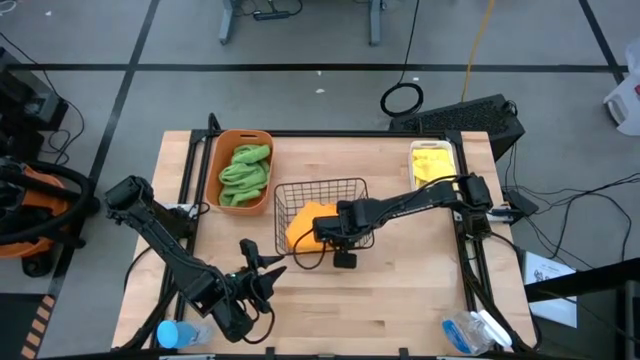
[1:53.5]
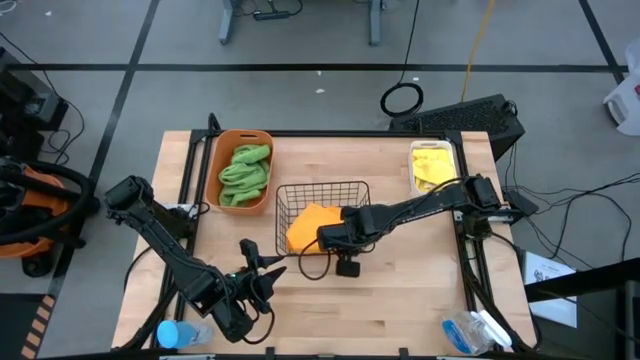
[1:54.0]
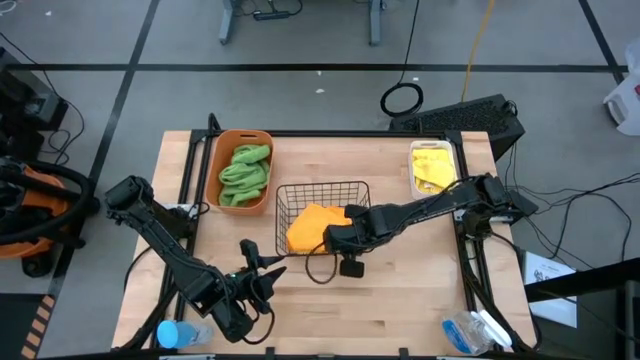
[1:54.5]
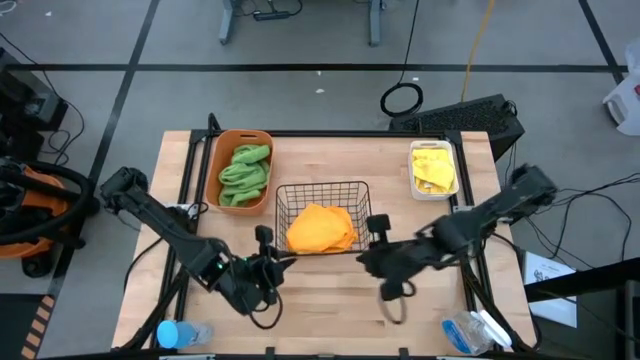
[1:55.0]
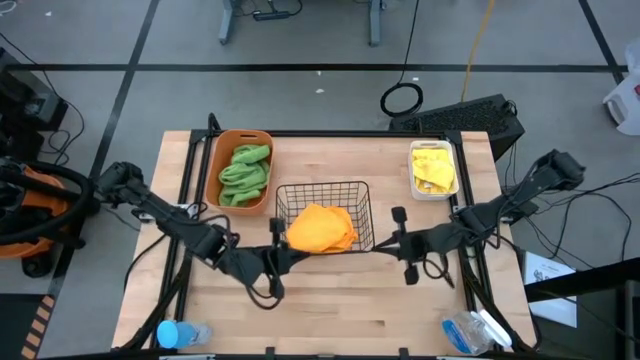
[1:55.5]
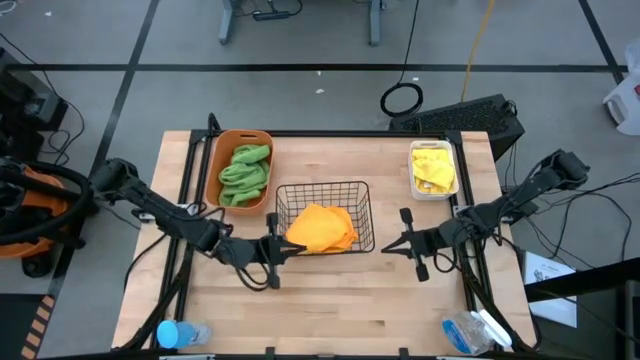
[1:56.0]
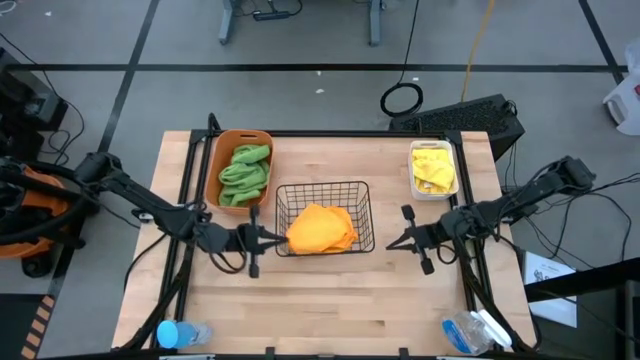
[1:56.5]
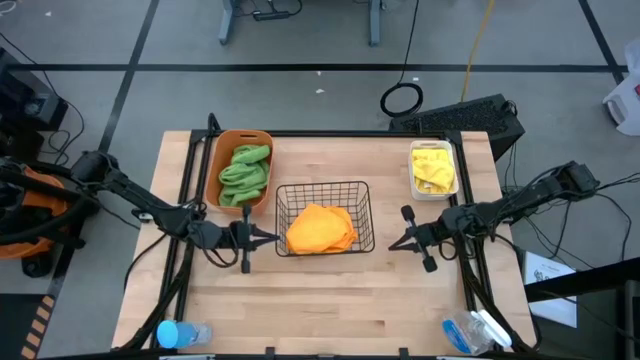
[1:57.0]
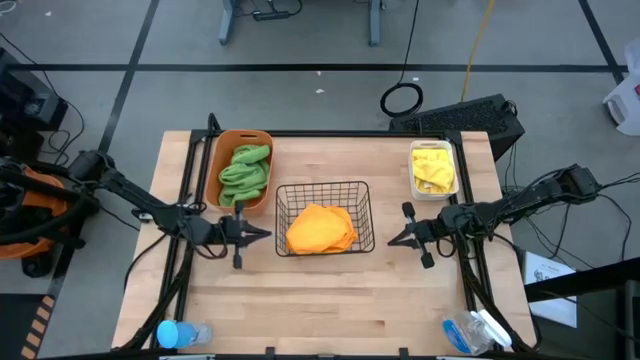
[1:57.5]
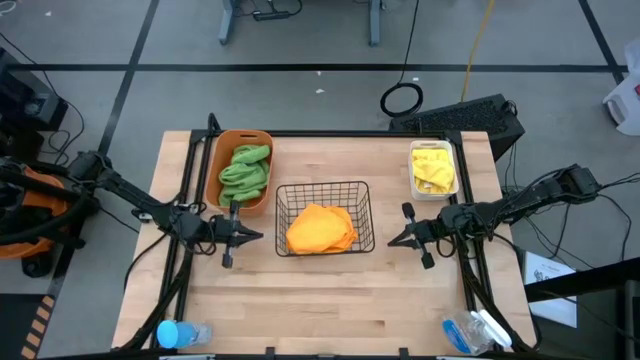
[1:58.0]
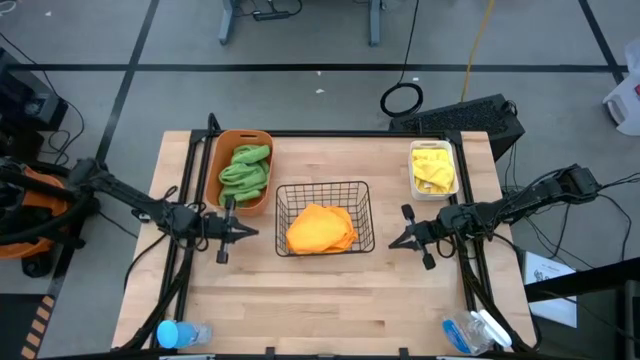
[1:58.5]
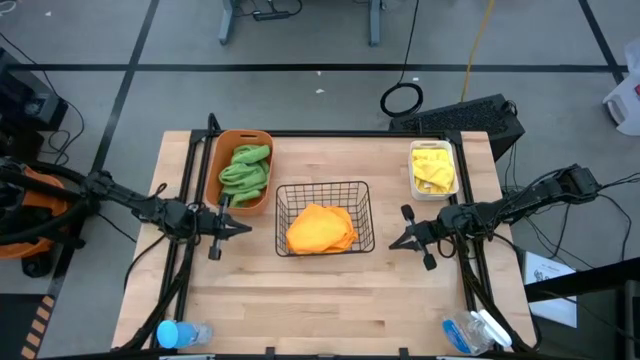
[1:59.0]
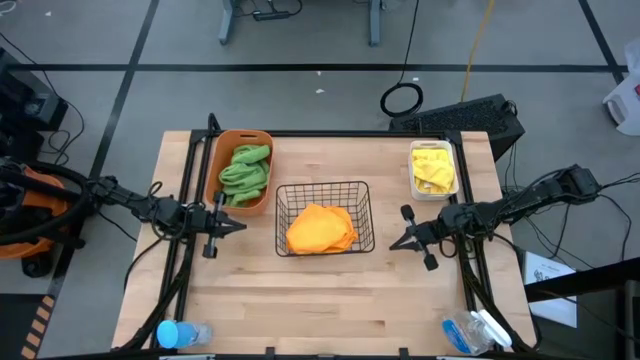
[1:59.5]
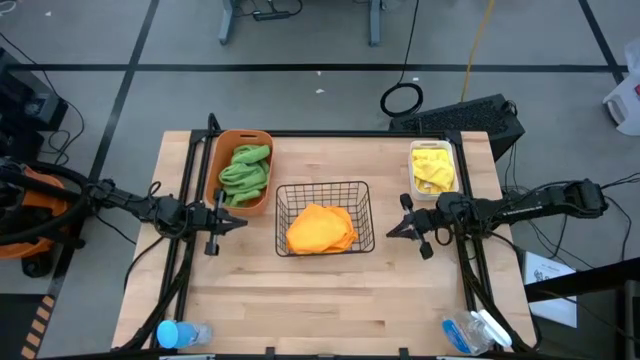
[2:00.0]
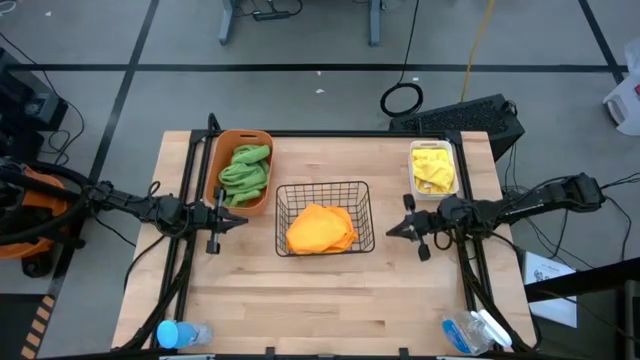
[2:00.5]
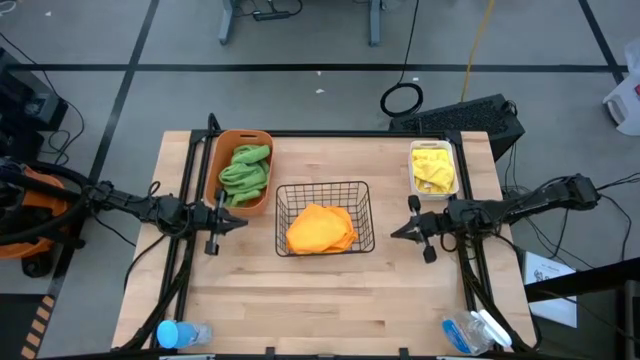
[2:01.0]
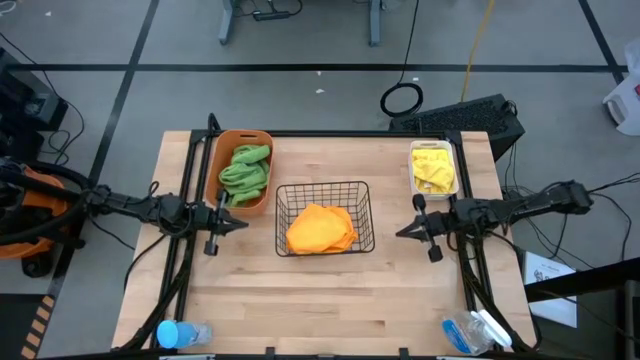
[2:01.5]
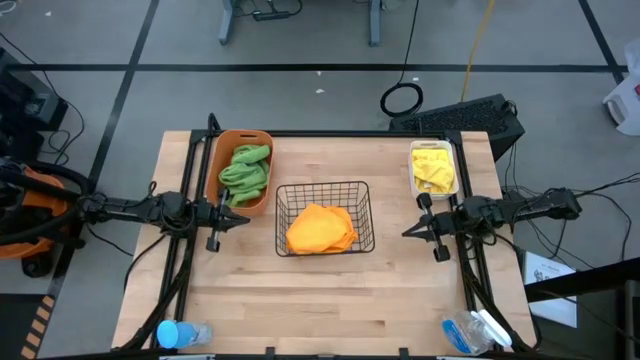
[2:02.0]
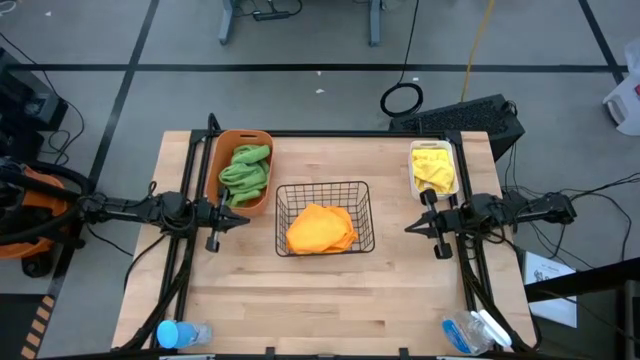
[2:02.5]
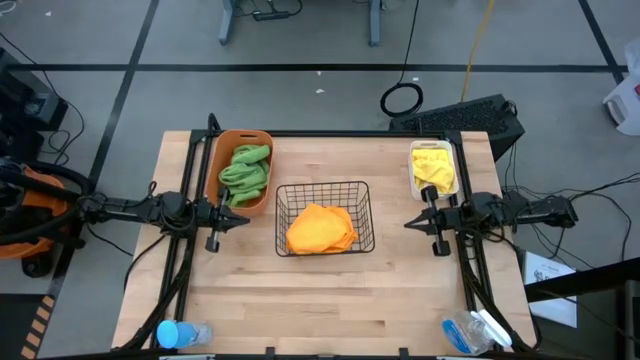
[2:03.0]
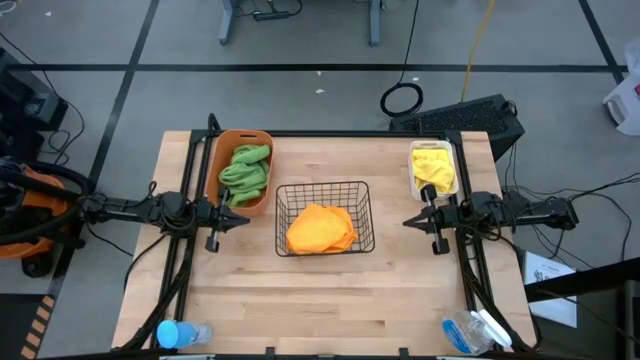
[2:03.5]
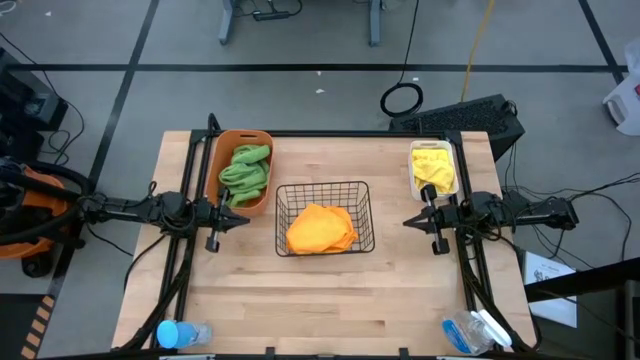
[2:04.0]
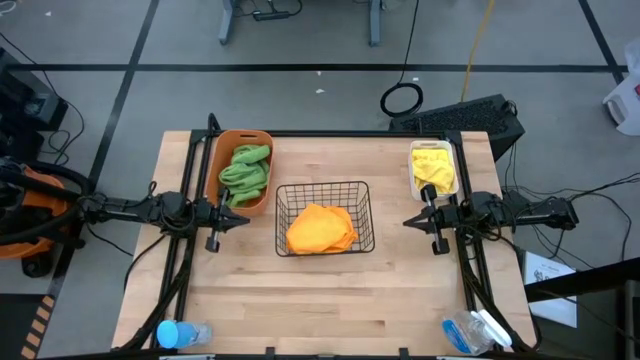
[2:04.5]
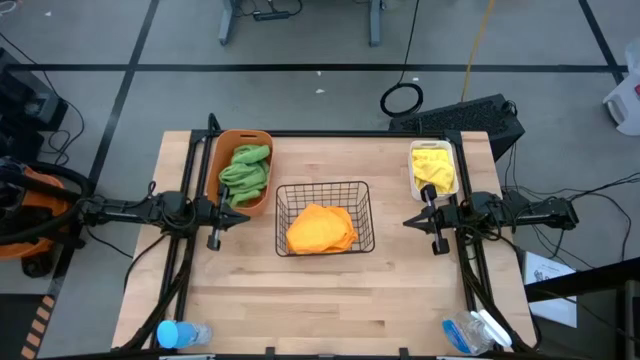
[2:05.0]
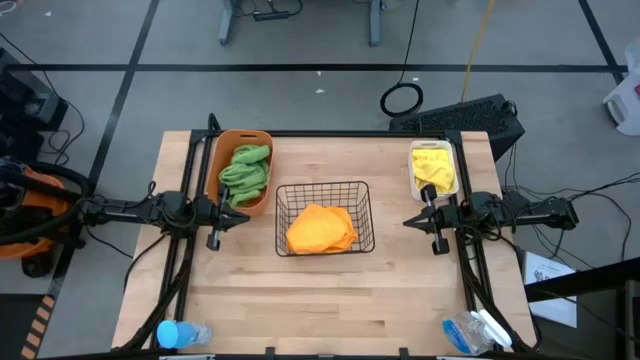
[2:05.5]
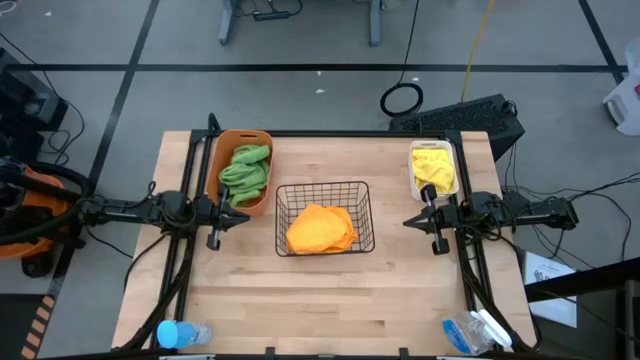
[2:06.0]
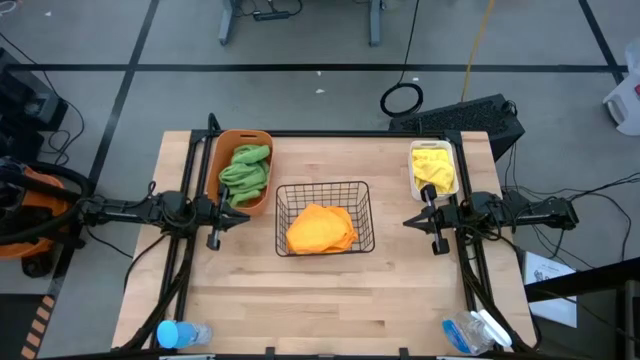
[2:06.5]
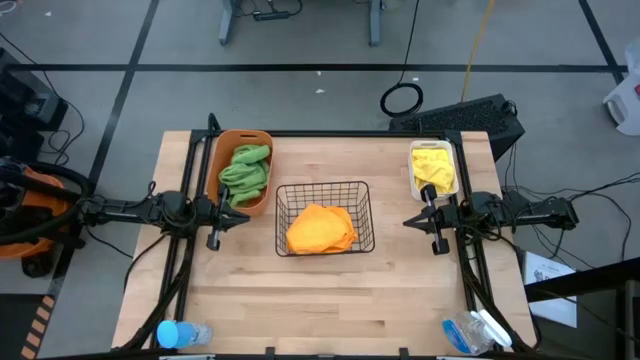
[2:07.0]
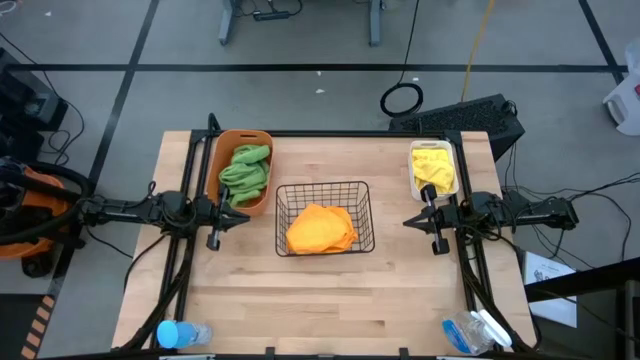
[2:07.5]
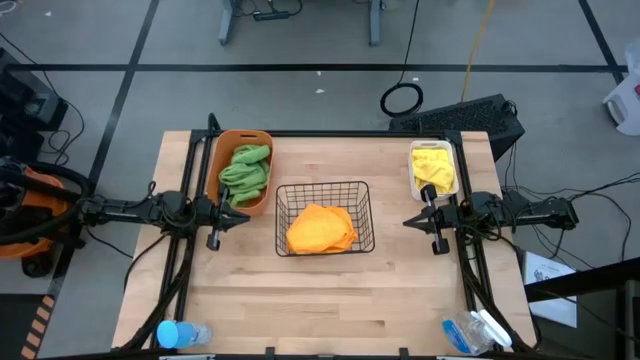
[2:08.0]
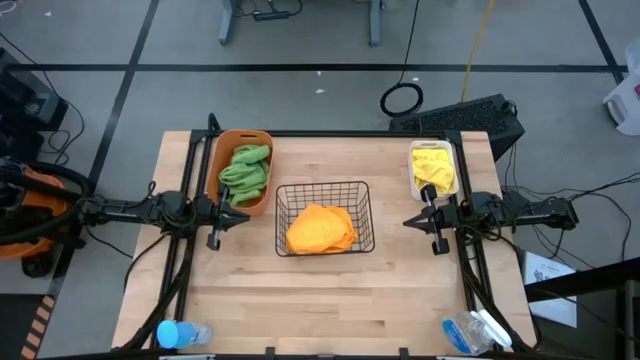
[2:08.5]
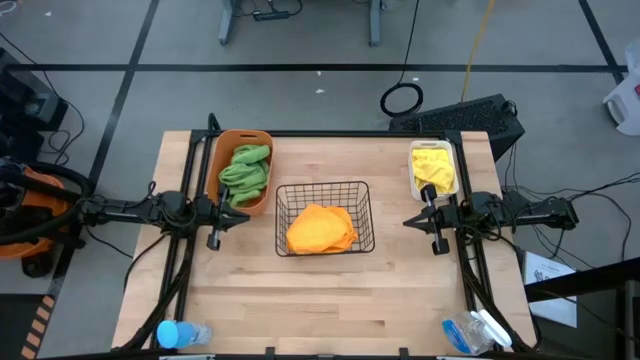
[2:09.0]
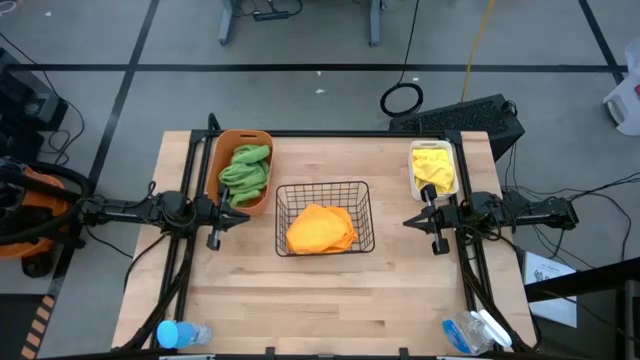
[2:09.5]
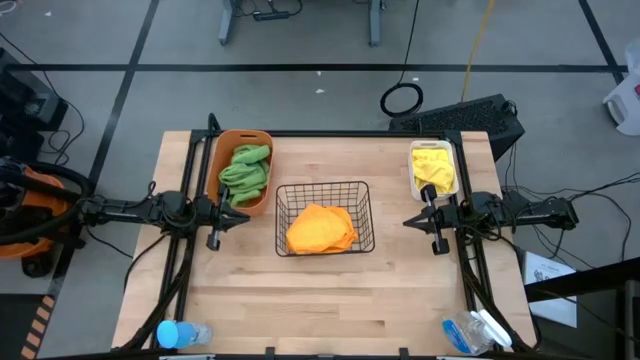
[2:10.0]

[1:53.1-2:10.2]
Task: Sort microfiber towel by color & place in baskets
Return to Home Position

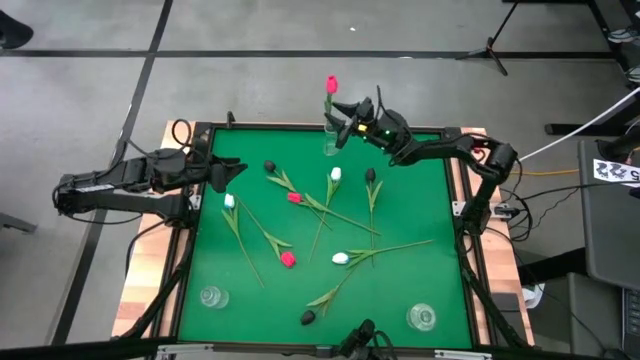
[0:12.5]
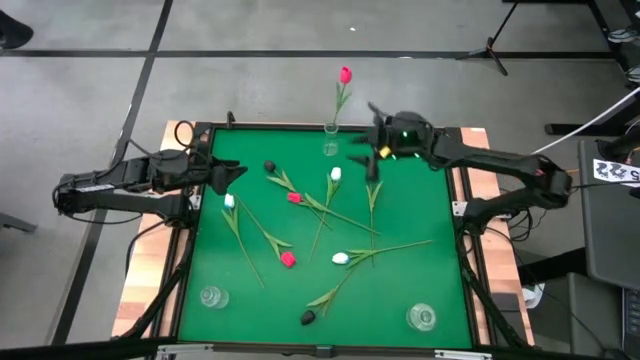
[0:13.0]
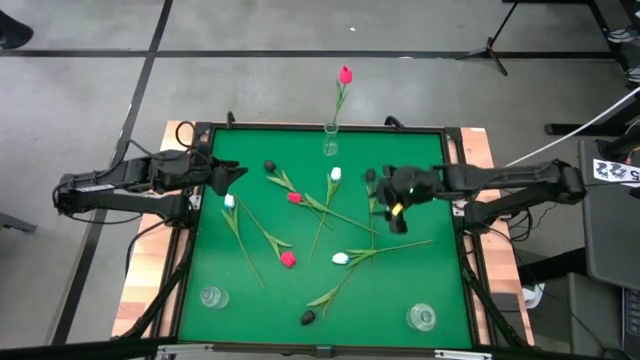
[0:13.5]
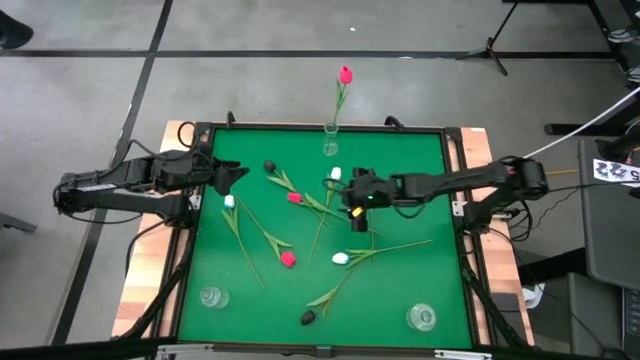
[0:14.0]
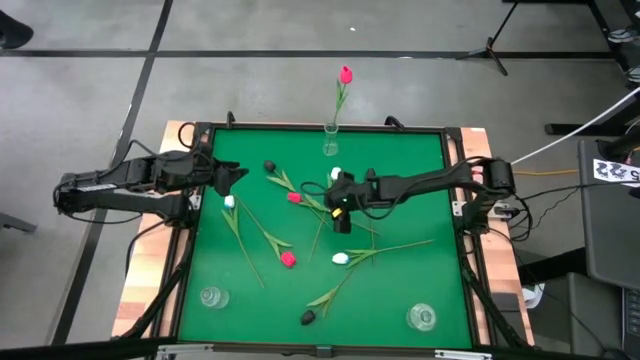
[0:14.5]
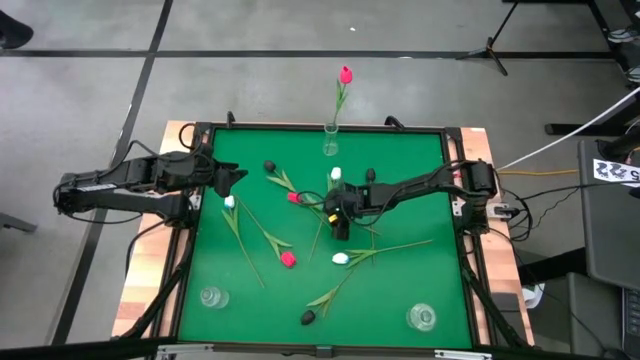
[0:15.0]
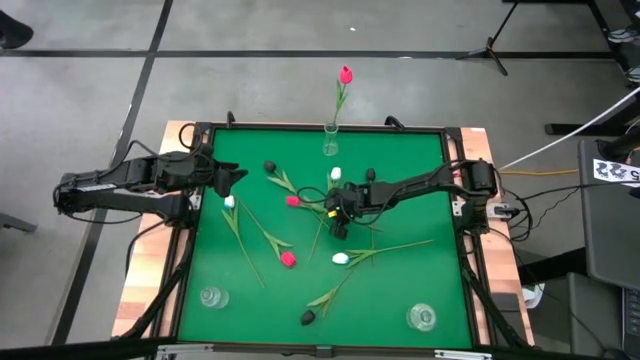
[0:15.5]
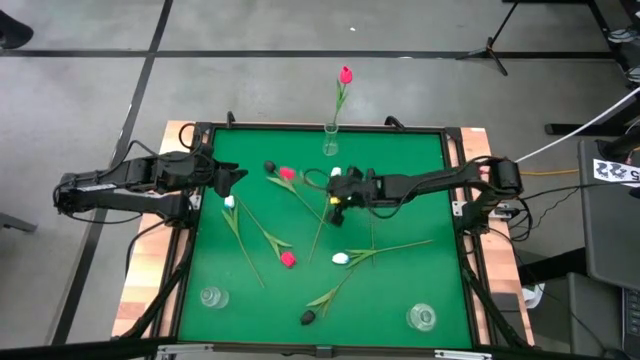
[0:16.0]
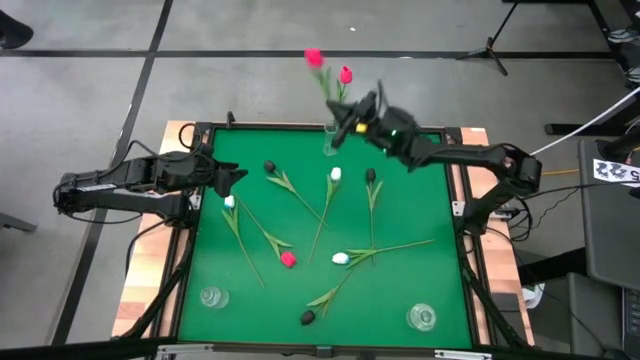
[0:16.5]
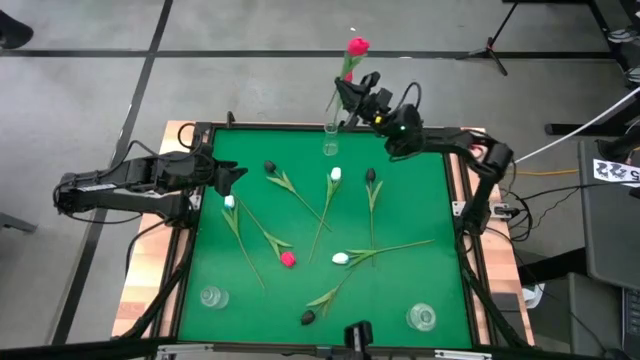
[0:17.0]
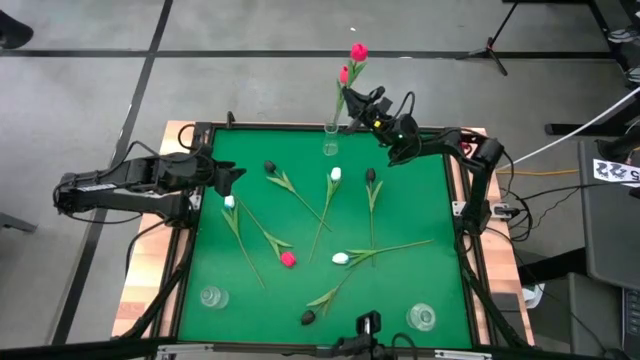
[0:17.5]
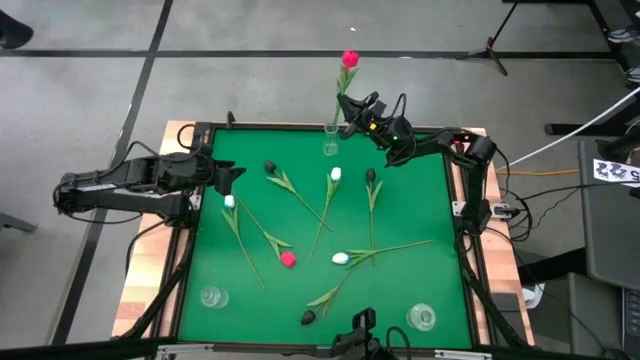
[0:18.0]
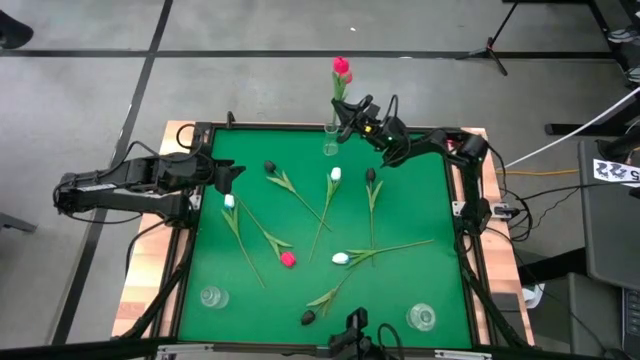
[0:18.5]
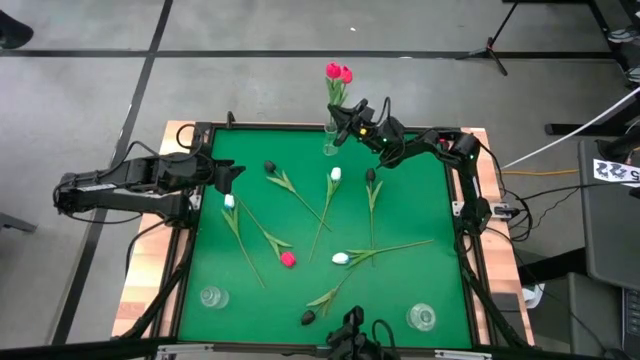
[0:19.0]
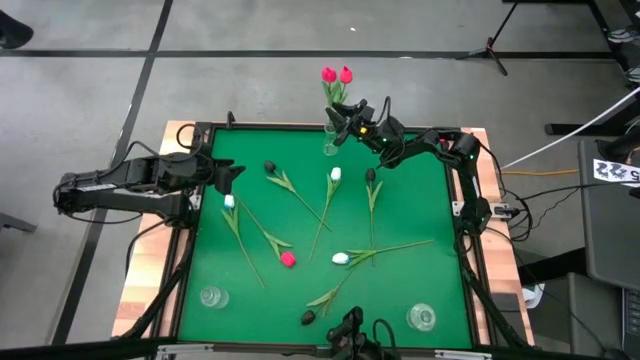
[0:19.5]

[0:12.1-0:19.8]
Task: Sort flowers into vase by color
Put the top red tulip into the top transparent vase
